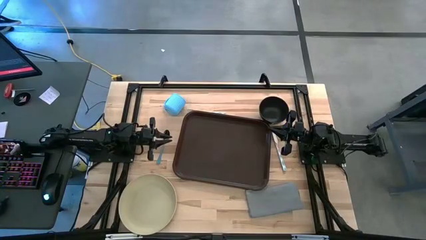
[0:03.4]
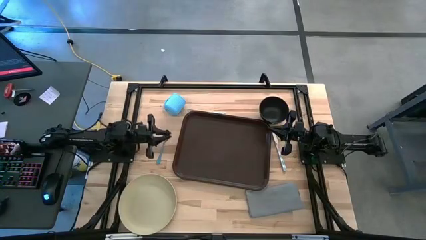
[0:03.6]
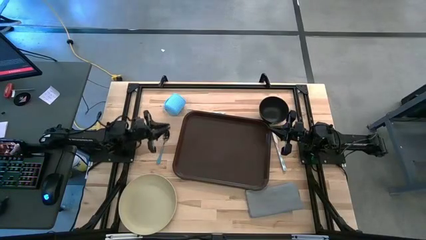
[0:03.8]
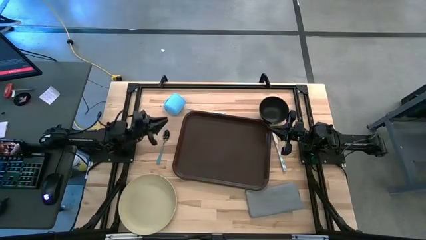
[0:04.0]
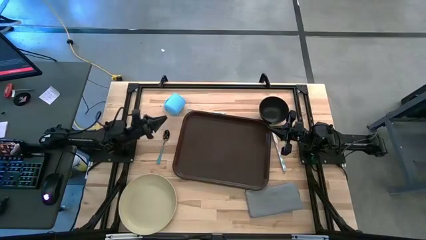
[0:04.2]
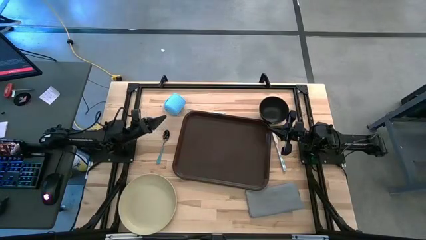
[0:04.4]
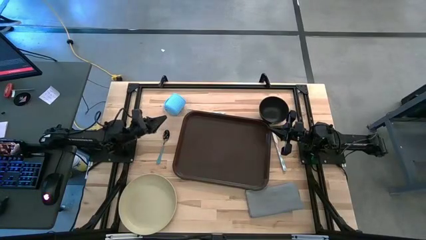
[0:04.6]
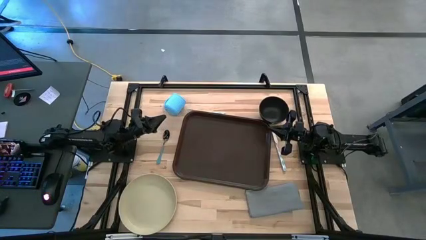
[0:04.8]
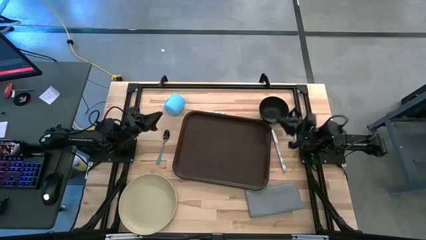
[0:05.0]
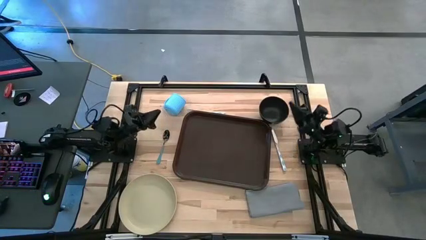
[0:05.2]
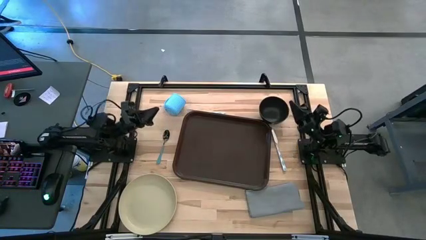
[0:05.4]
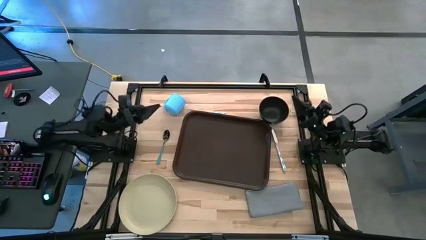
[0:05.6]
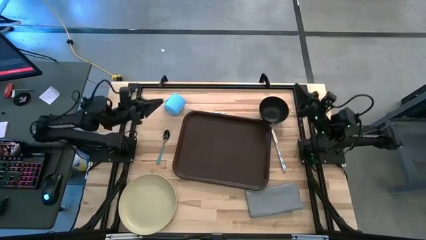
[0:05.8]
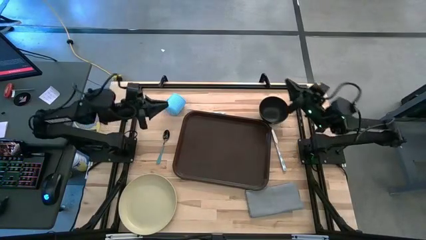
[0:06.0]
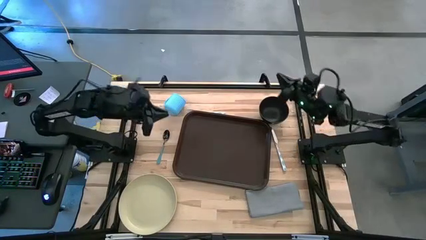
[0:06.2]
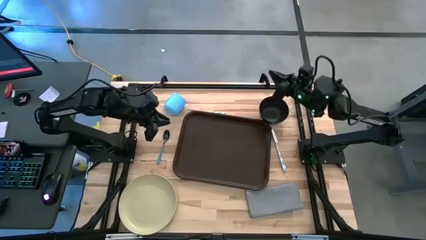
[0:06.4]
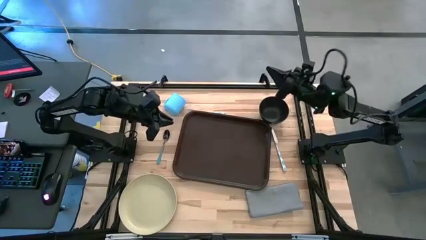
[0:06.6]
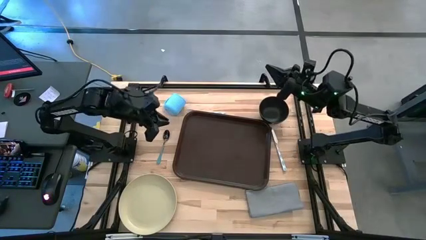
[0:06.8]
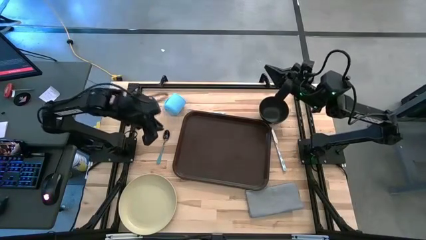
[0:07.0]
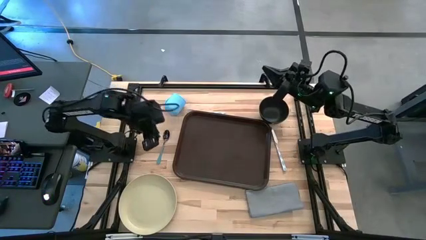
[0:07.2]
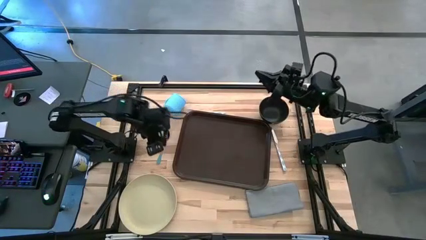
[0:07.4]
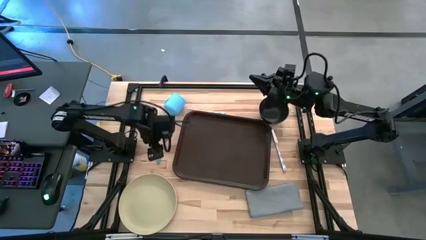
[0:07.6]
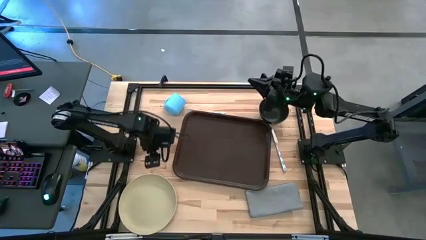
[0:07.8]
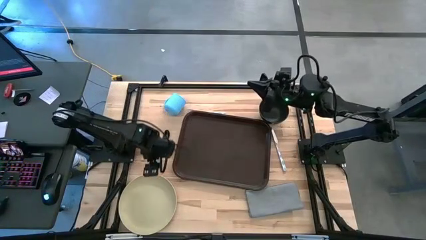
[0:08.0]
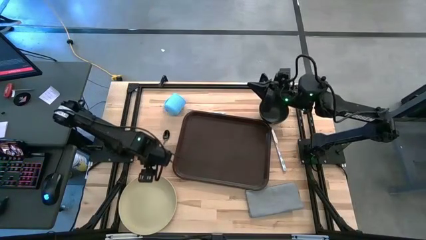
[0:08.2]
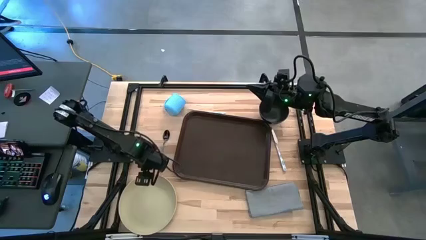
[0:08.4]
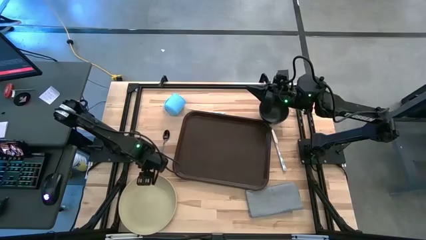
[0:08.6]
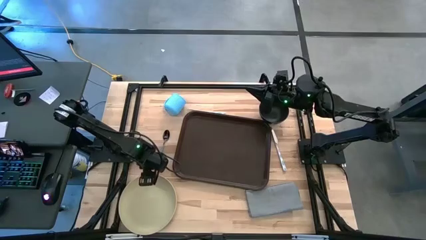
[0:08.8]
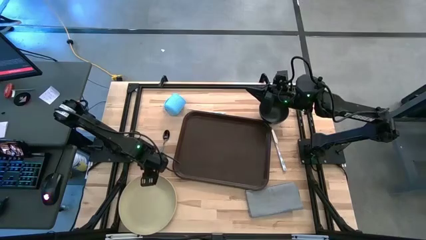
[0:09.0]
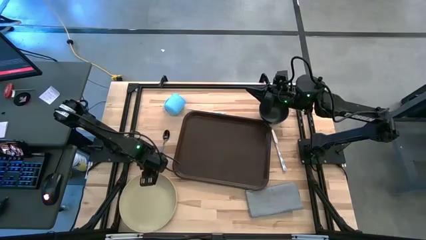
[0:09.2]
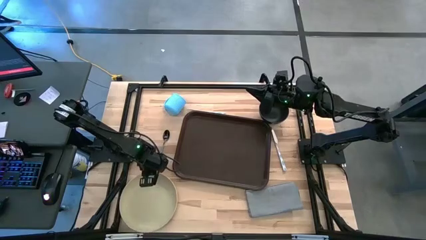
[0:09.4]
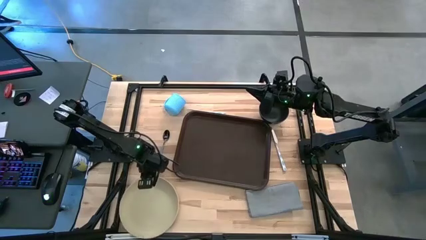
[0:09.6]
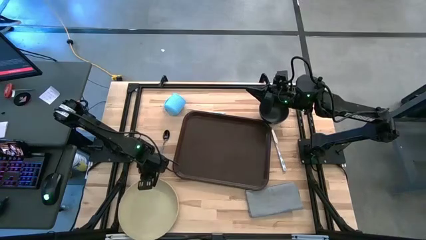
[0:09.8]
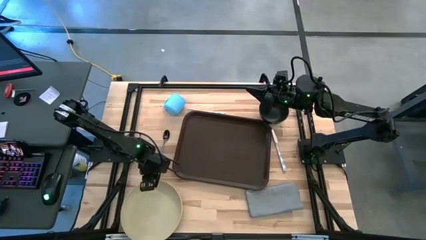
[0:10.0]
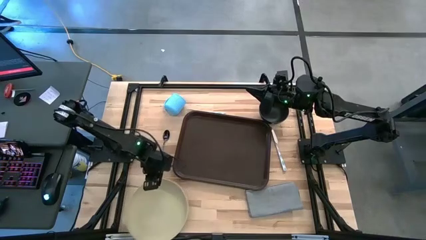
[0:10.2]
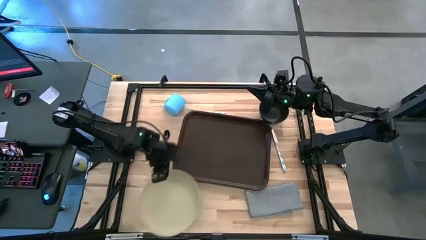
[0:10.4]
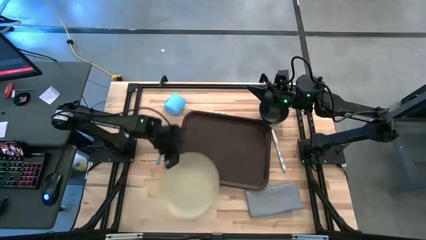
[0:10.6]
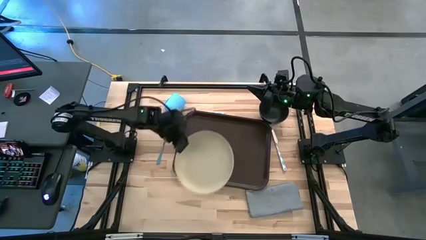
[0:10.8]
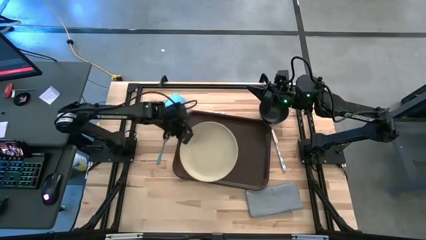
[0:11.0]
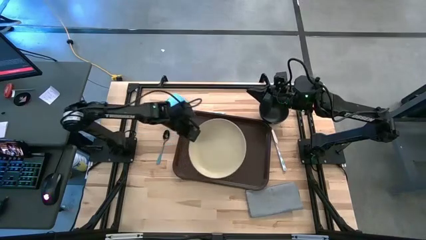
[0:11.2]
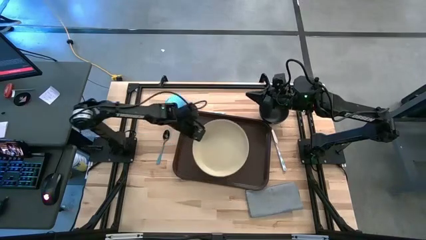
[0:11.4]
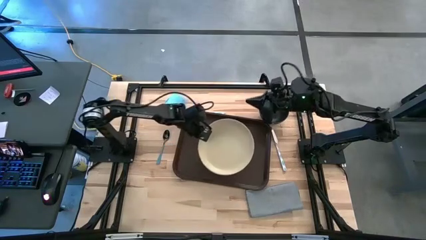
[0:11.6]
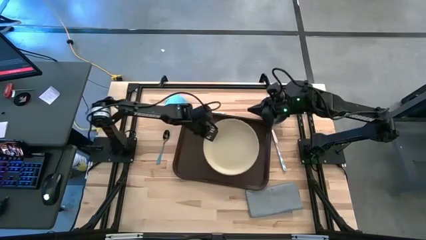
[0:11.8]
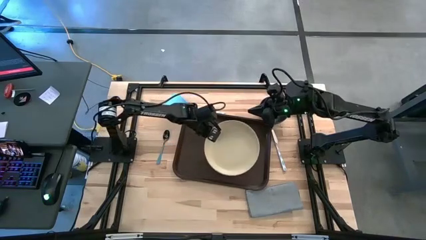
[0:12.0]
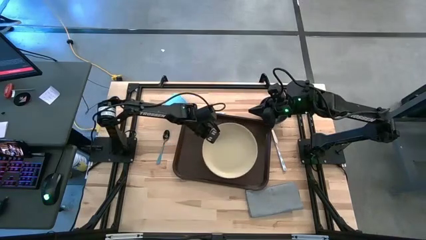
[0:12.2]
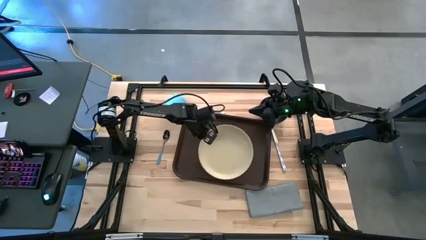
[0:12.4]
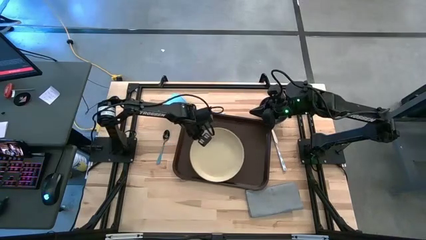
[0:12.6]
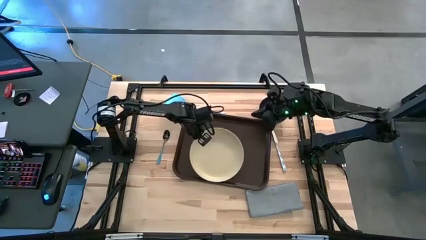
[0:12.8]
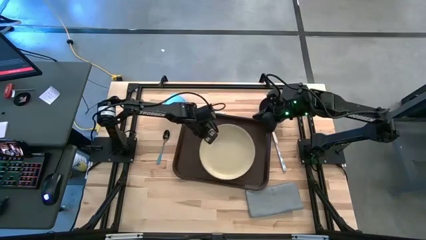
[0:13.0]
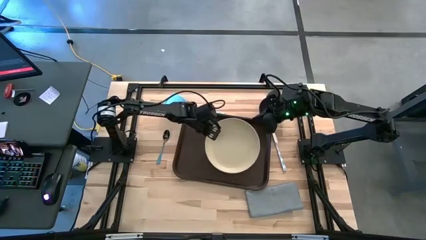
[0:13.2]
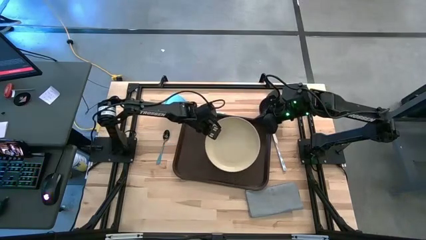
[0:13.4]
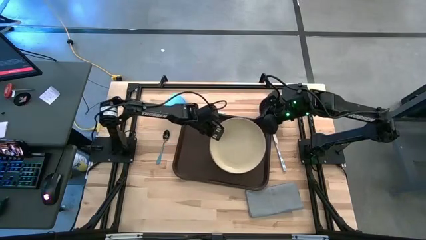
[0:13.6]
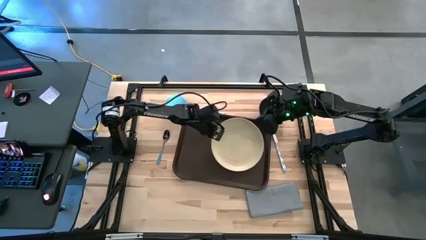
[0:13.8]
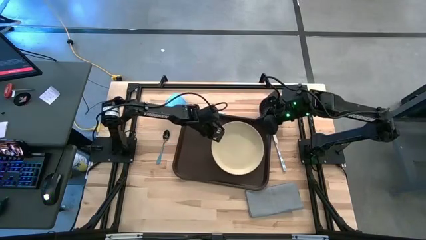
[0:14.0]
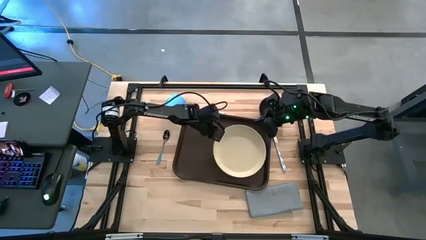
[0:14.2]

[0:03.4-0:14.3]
Task: Set up tray
Put the brown plate on top of the dark brown serving tray

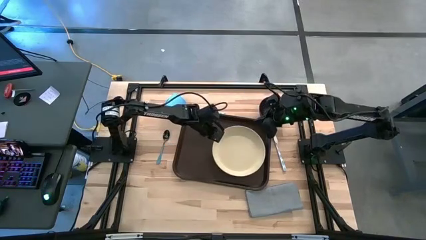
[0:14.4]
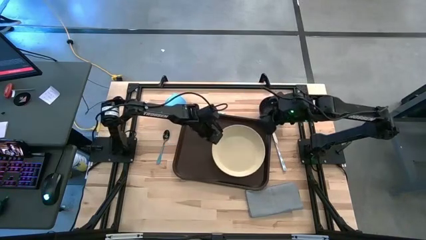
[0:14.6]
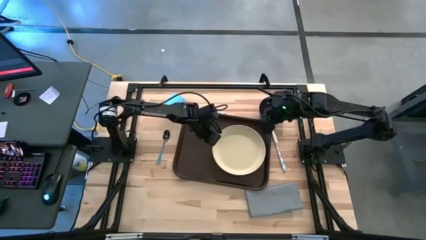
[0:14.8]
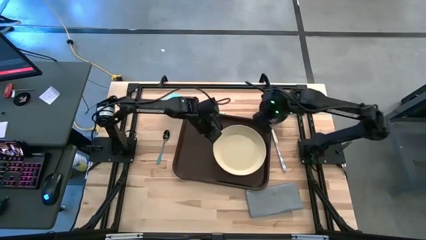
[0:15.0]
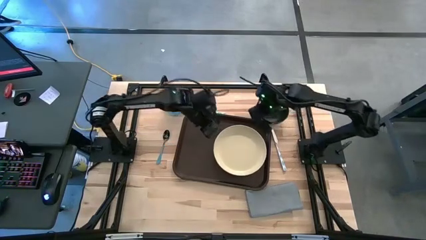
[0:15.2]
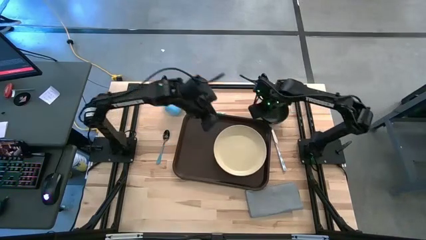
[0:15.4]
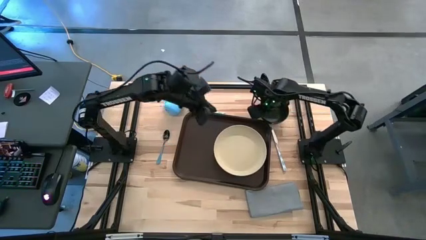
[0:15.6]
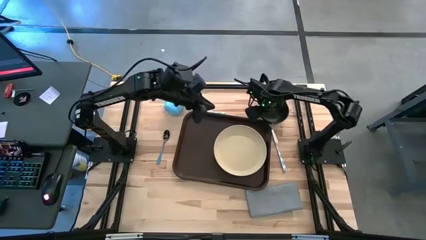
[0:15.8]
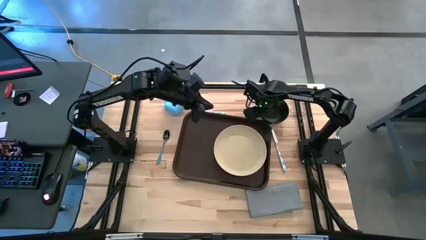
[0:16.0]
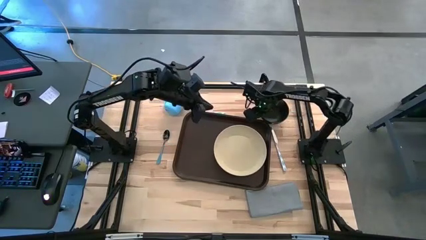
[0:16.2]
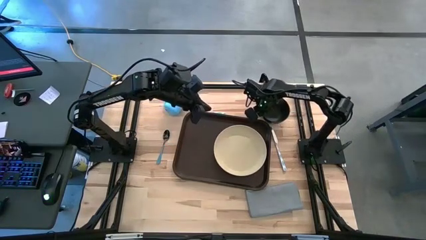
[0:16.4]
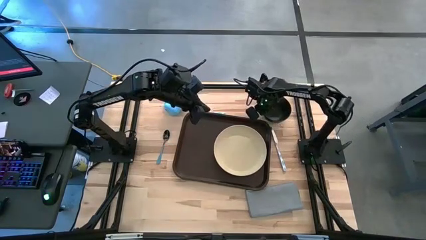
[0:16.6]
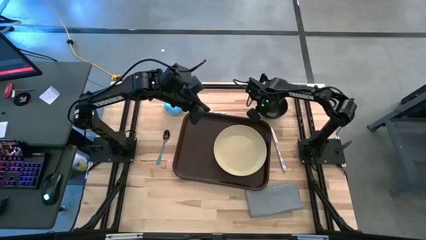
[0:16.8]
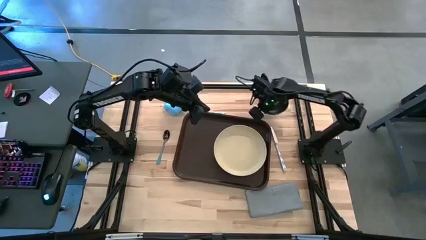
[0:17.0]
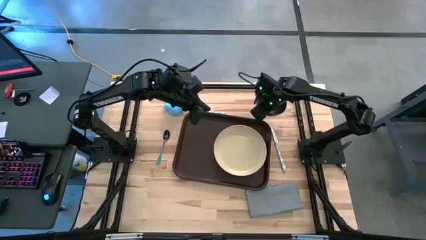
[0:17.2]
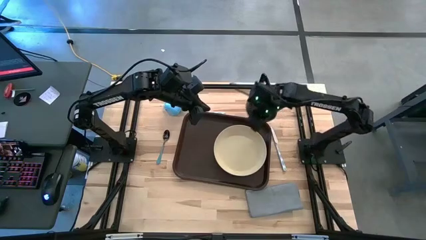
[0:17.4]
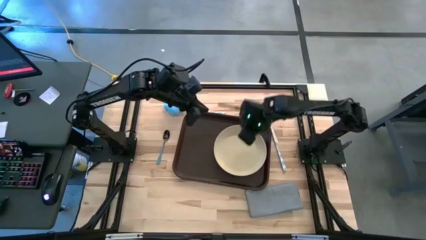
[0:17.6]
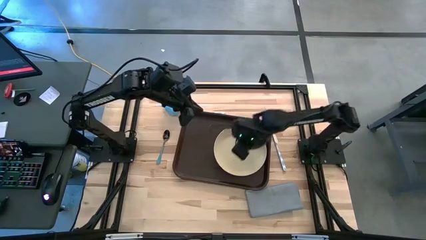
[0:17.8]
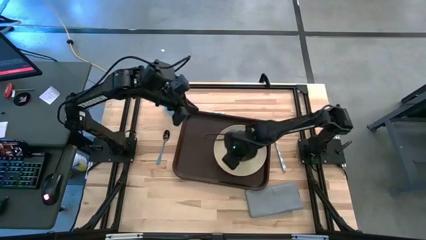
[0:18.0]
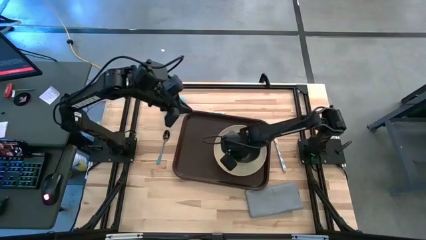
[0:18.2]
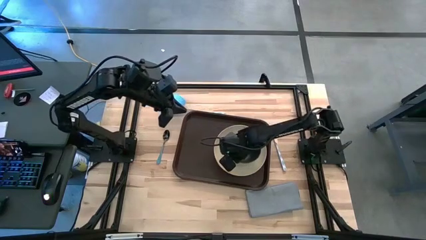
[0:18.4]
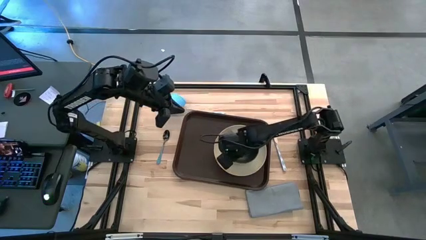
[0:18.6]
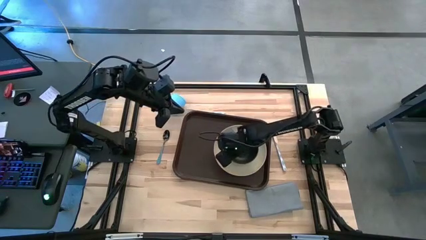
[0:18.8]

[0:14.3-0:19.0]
Put the black bowl on top of the brown plate on the dark brown serving tray
